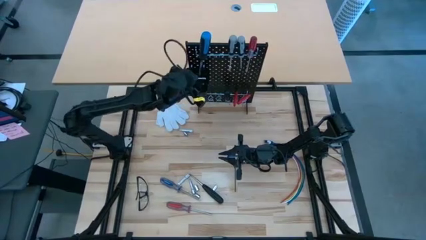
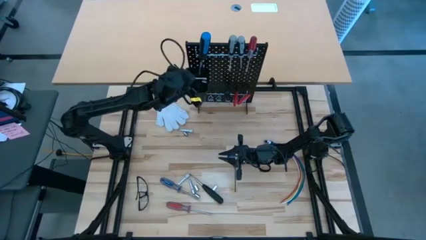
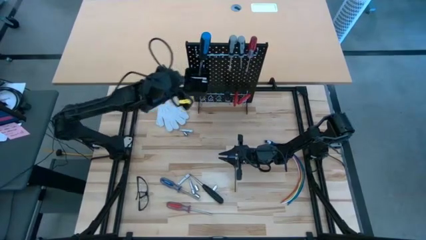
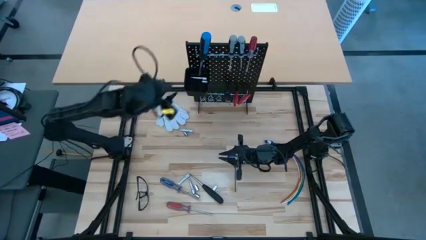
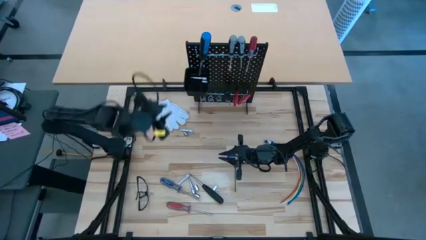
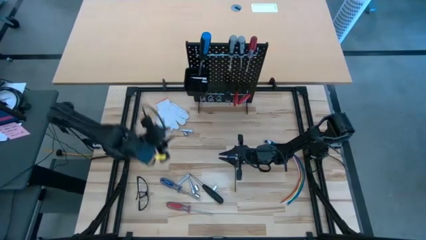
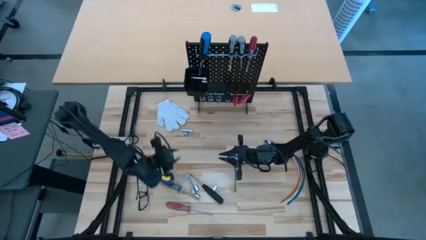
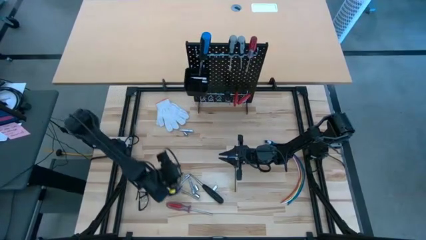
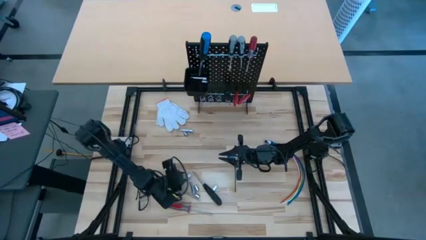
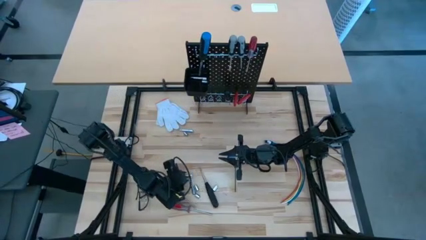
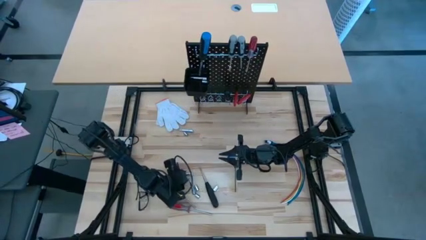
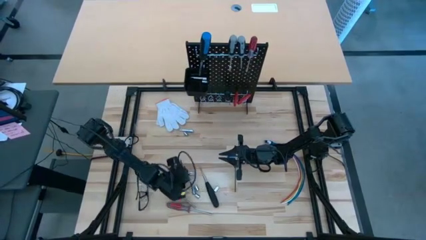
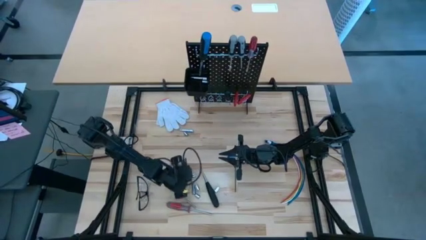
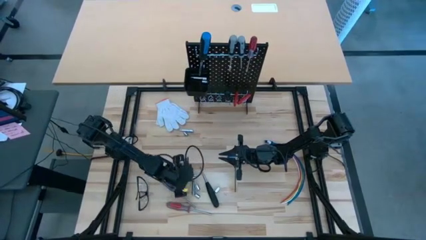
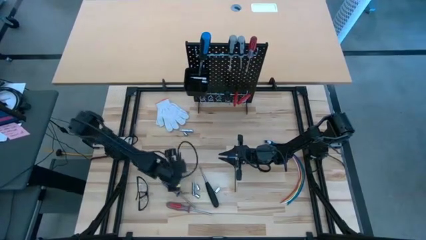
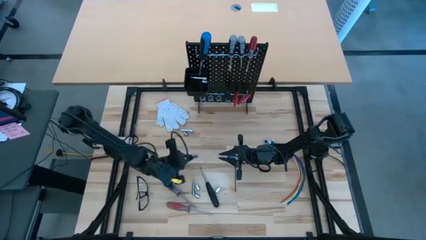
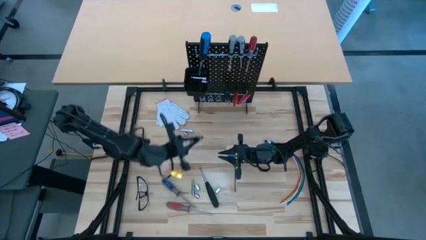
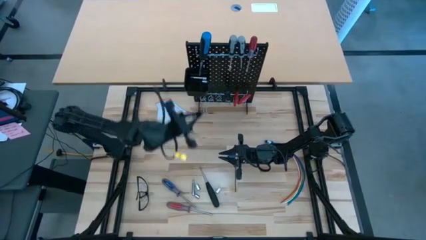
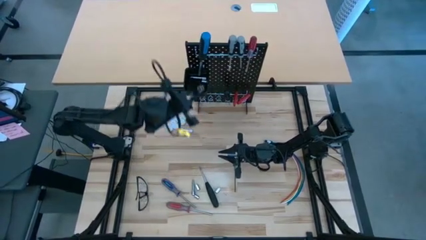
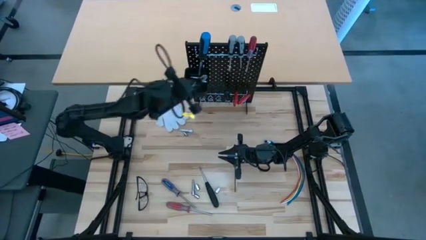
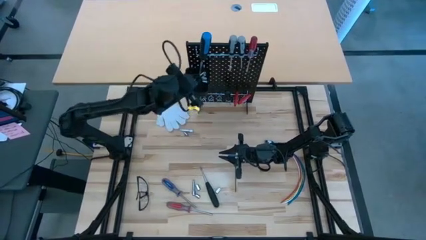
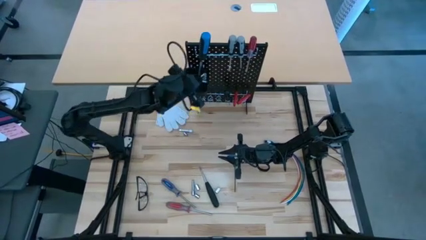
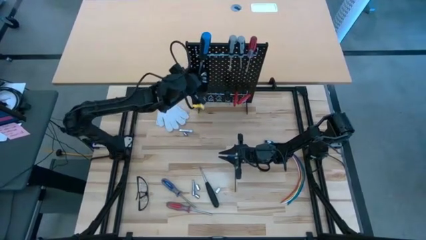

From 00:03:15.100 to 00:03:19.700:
Task: Hang tools onto peg board
Put the extension bar in the pegboard bin

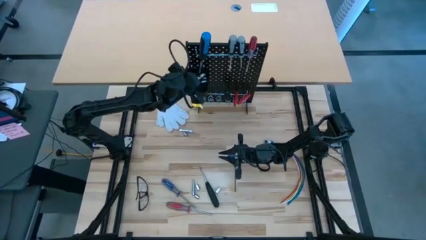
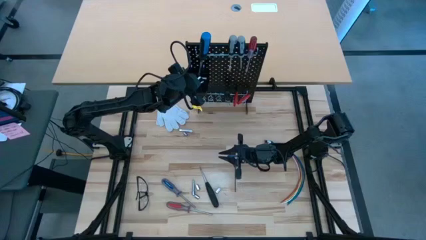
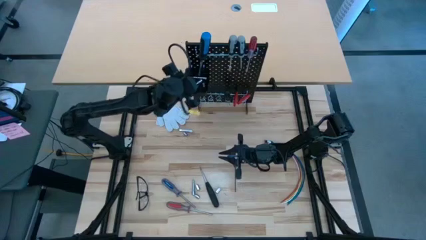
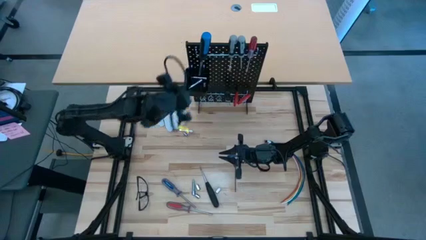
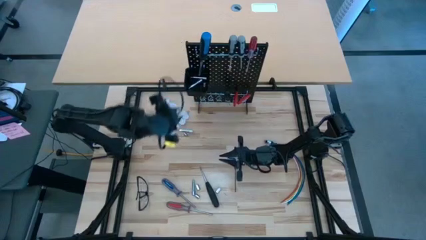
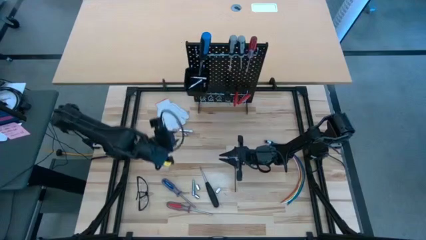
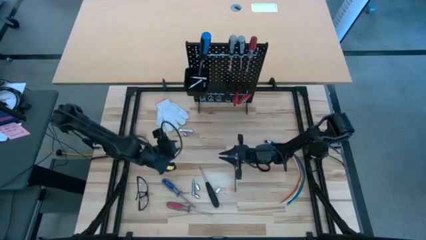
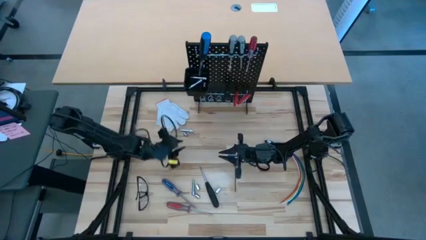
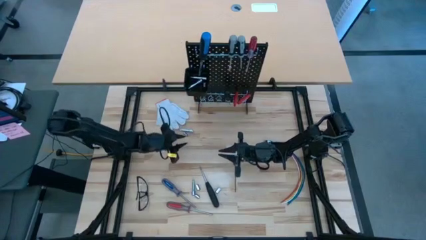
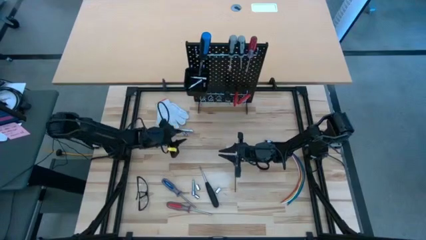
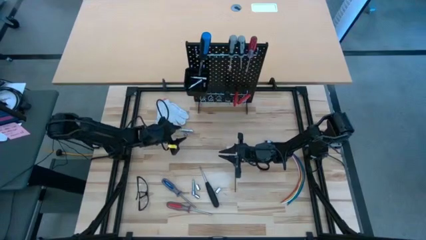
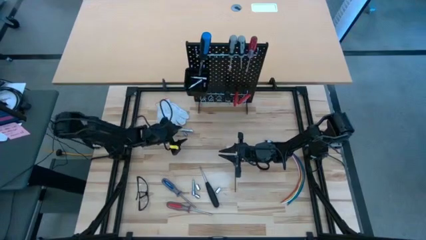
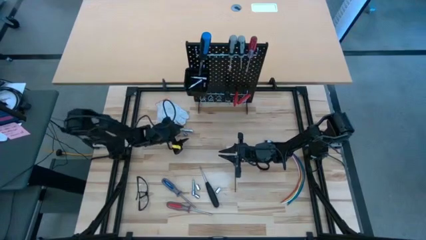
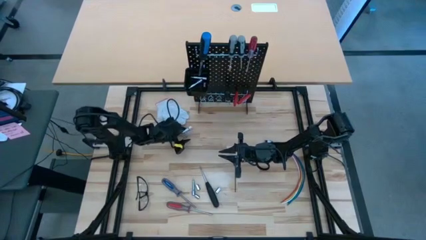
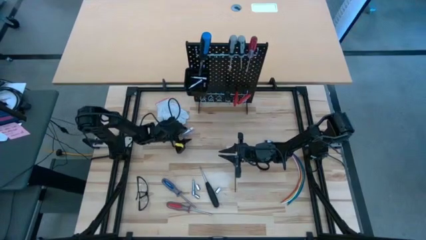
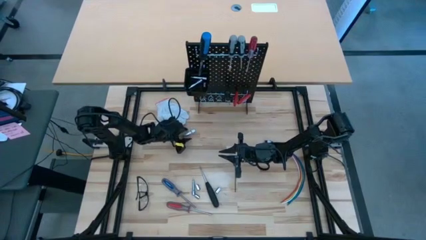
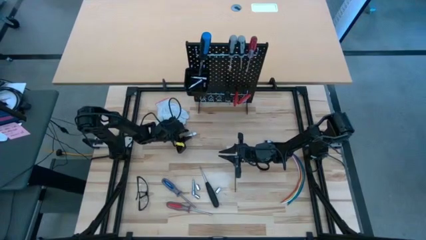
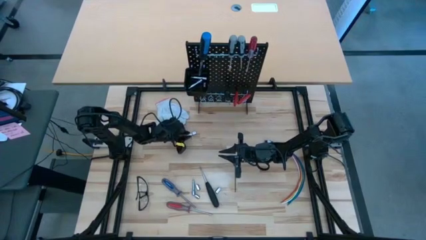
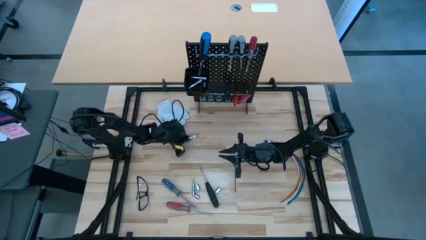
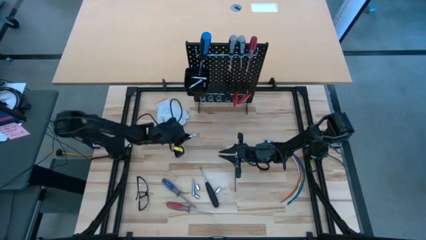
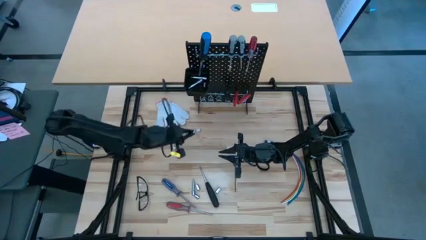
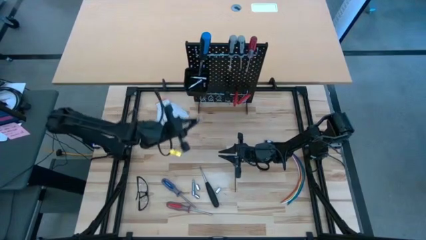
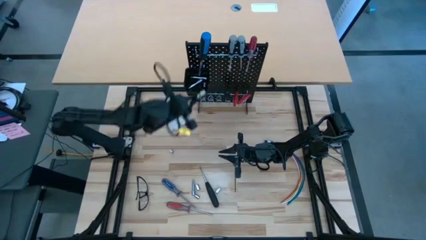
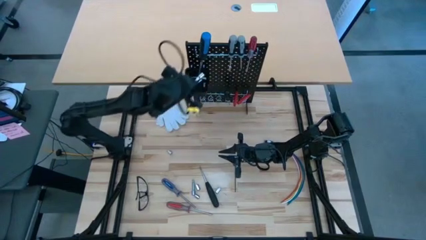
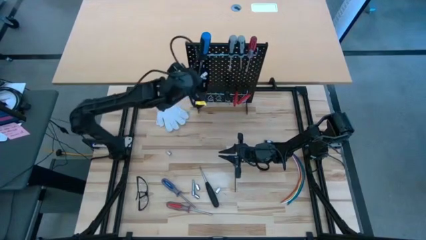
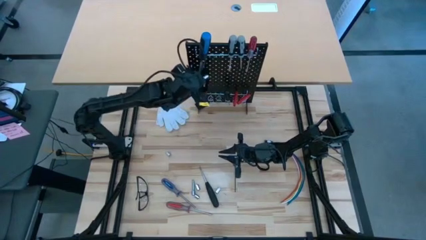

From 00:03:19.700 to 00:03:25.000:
Put the socket in the pegboard bin

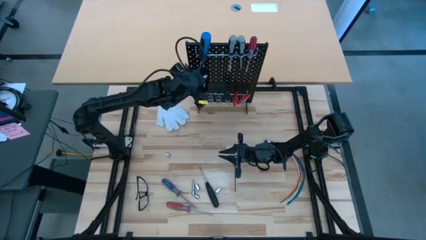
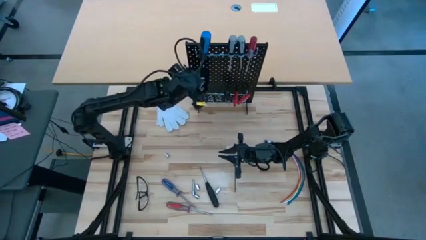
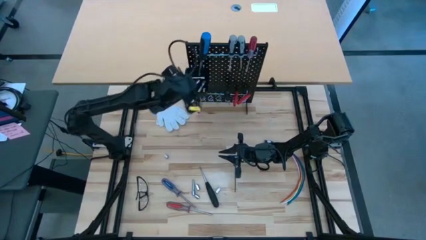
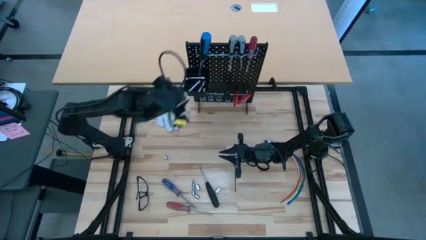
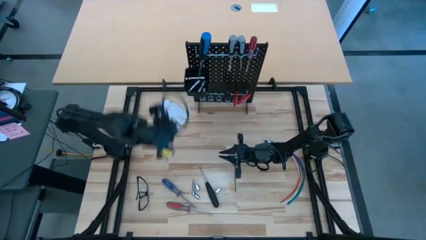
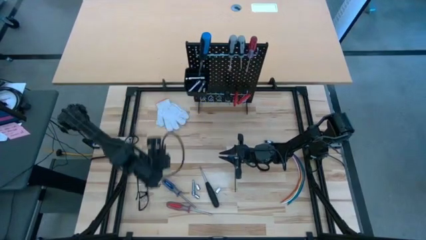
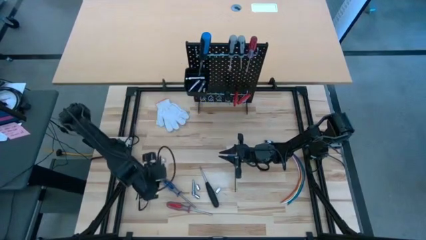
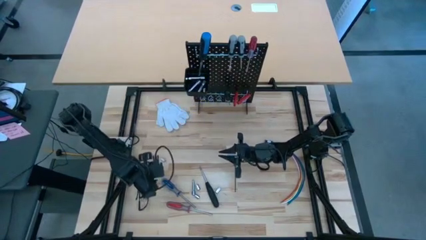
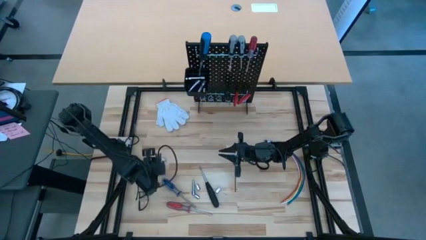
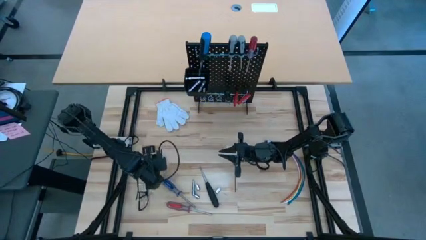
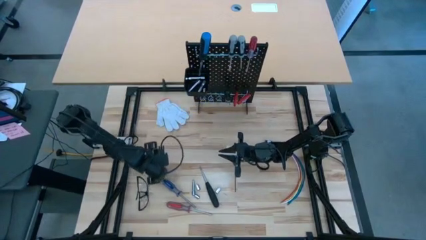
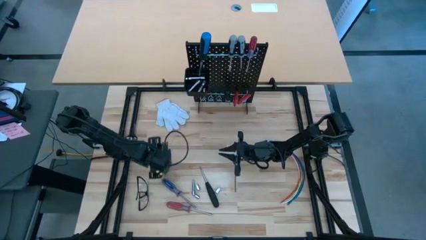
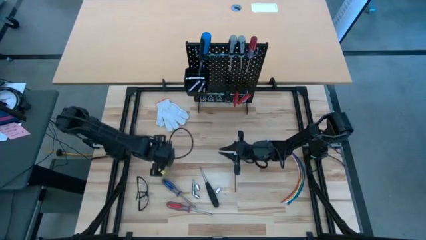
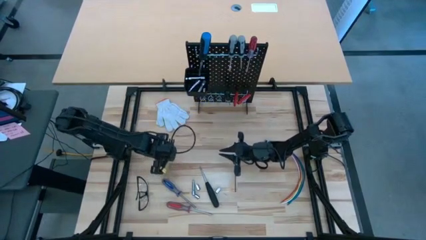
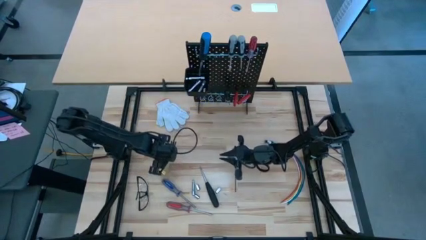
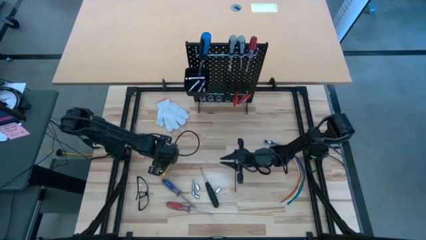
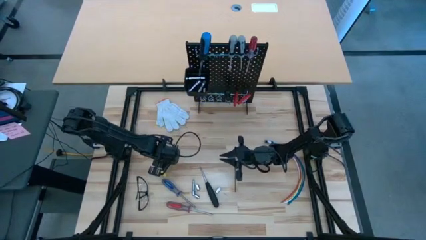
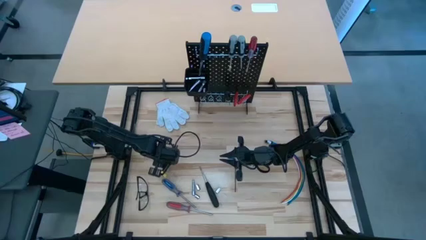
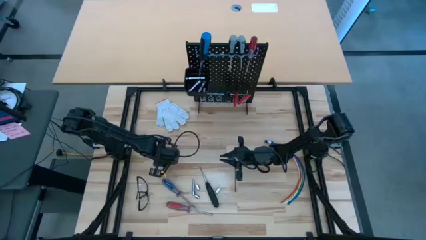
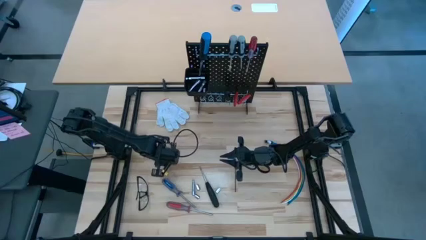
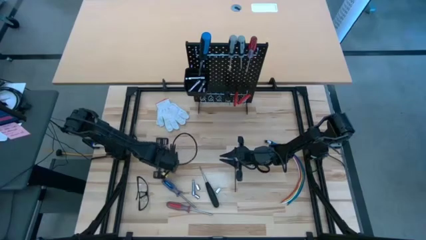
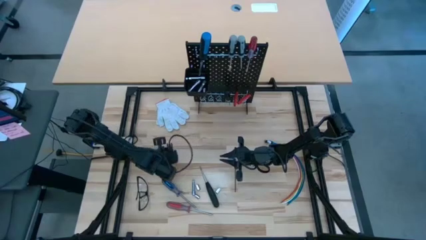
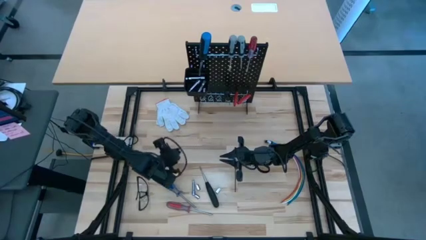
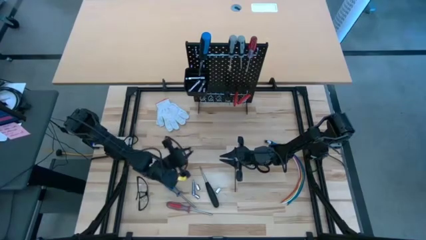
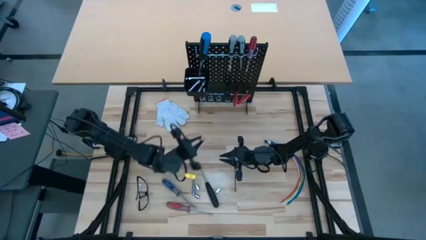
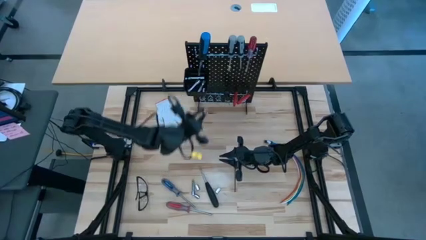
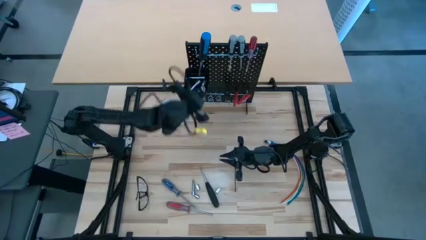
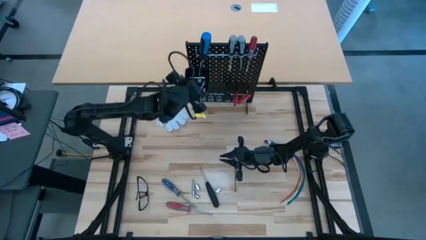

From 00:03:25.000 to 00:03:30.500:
Put the socket wrench in the pegboard bin

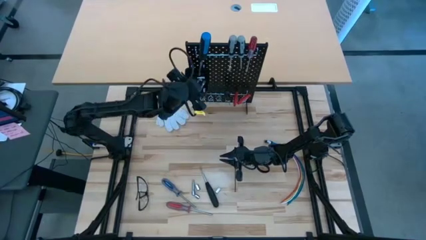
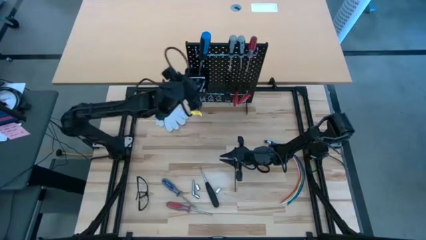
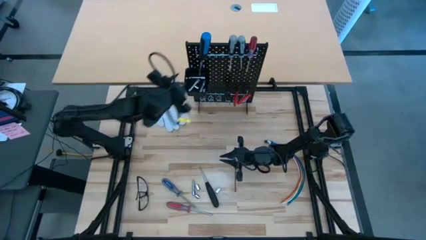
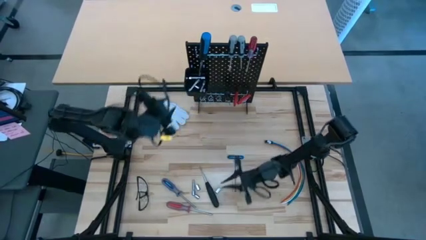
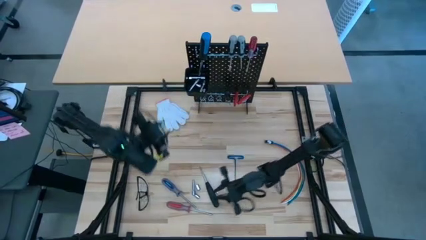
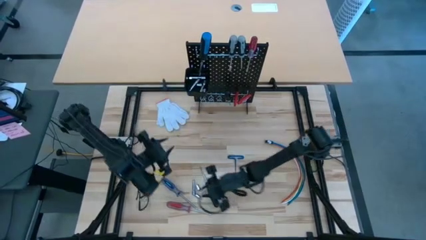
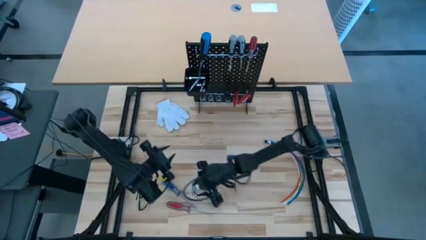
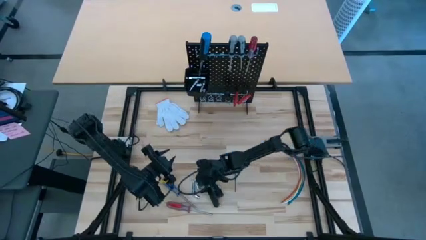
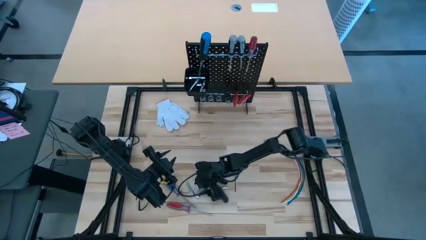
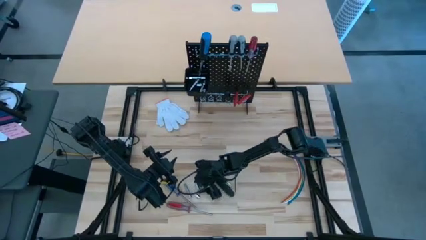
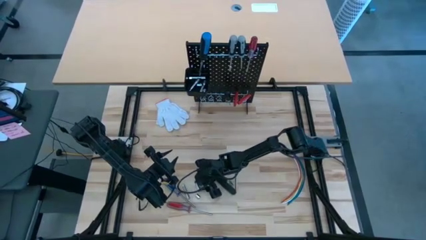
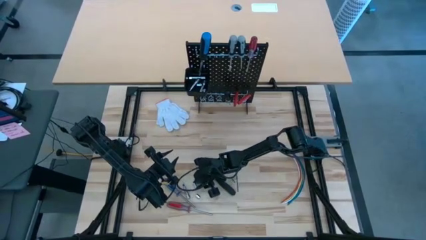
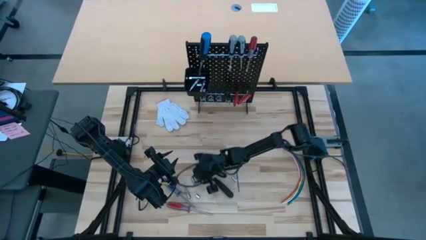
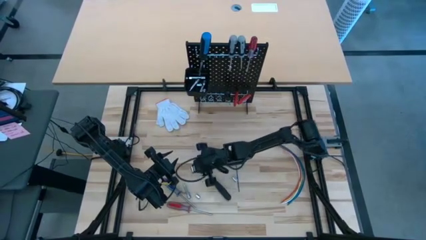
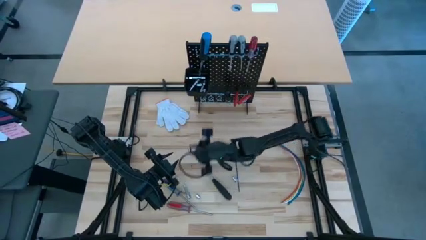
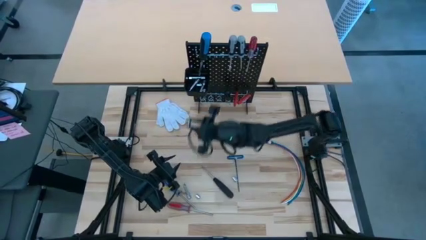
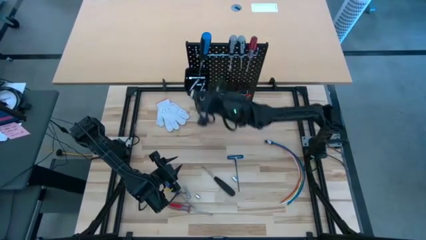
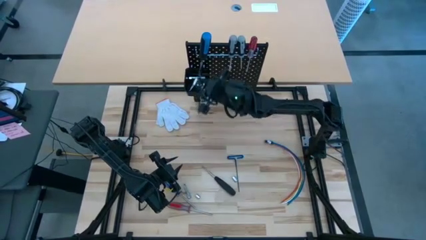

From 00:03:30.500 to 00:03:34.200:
Put the socket wrench on the pegboard bin
